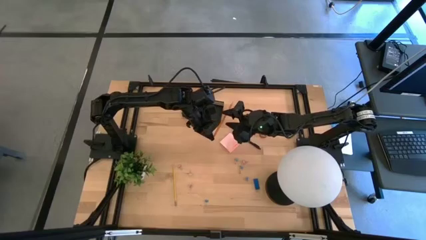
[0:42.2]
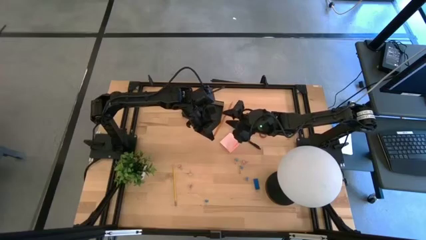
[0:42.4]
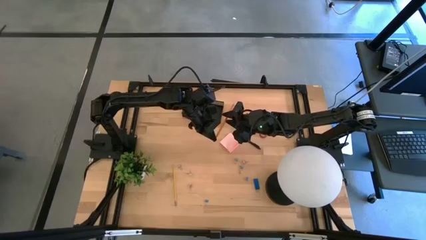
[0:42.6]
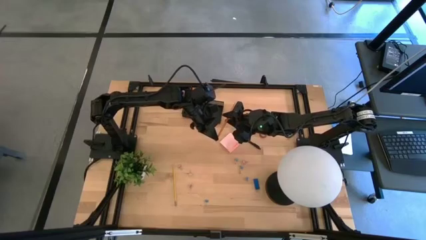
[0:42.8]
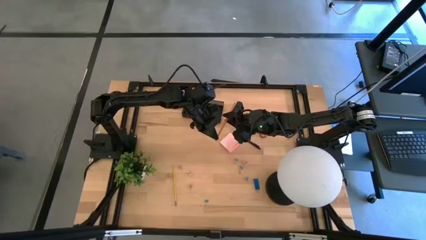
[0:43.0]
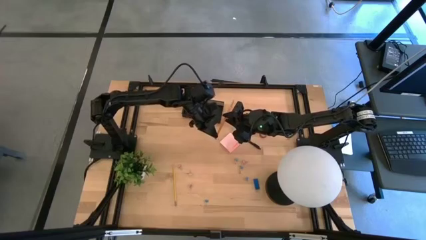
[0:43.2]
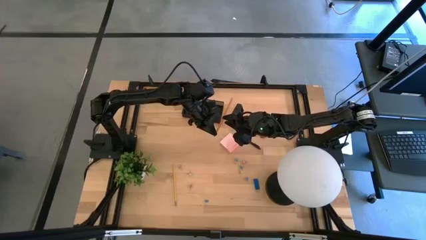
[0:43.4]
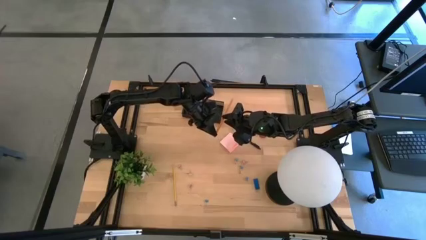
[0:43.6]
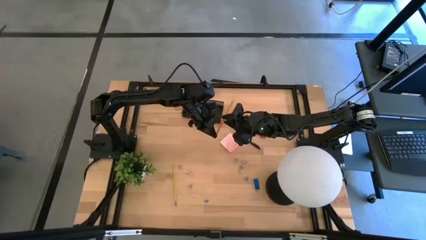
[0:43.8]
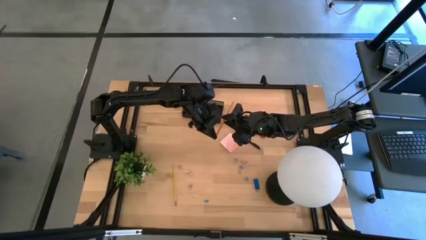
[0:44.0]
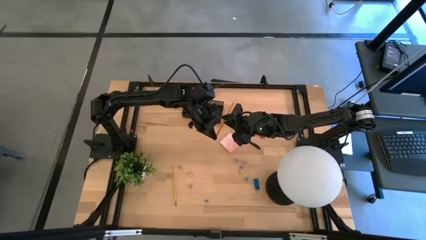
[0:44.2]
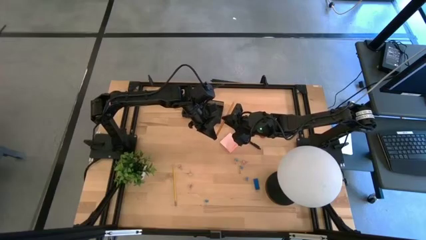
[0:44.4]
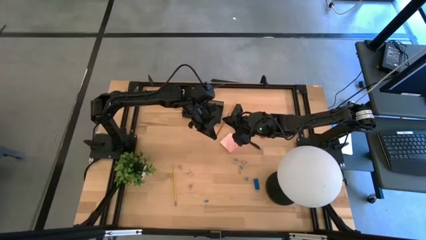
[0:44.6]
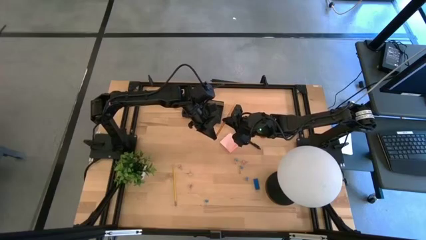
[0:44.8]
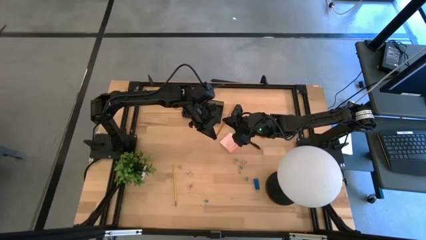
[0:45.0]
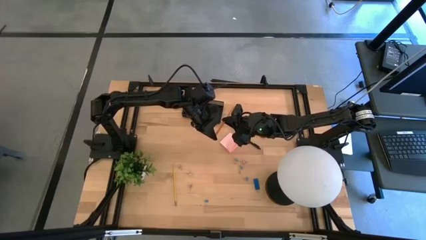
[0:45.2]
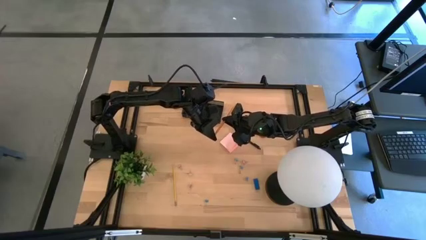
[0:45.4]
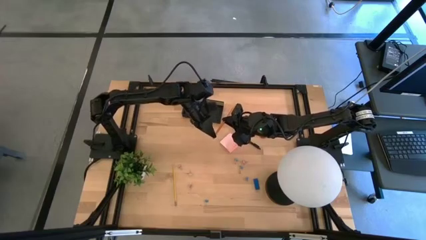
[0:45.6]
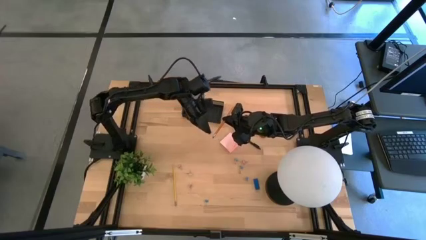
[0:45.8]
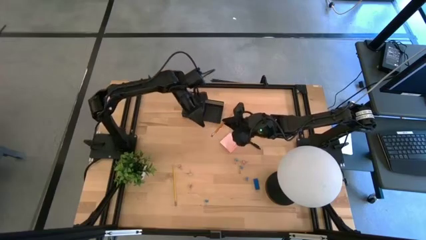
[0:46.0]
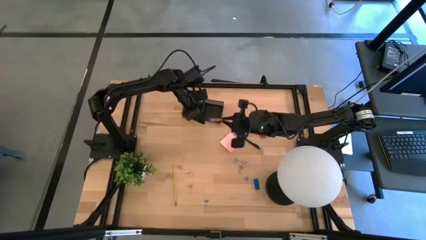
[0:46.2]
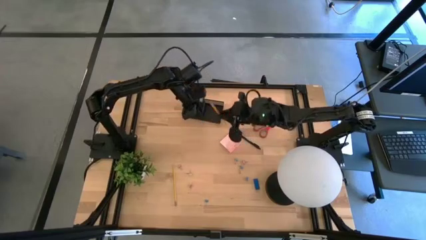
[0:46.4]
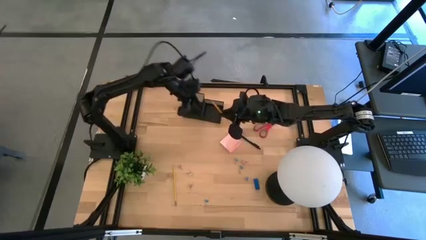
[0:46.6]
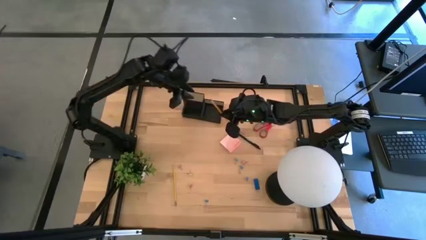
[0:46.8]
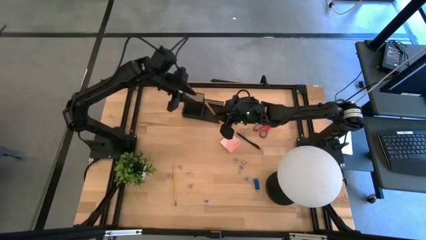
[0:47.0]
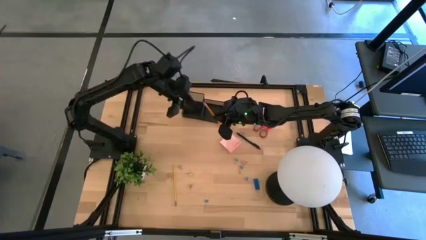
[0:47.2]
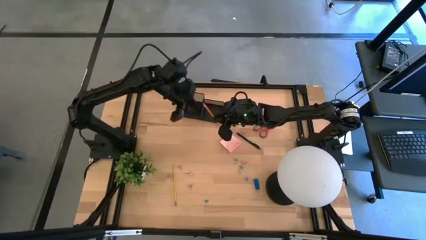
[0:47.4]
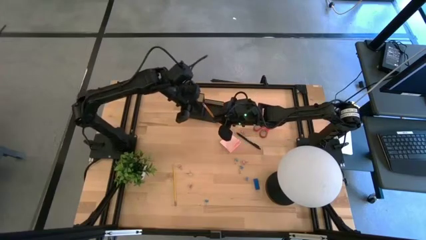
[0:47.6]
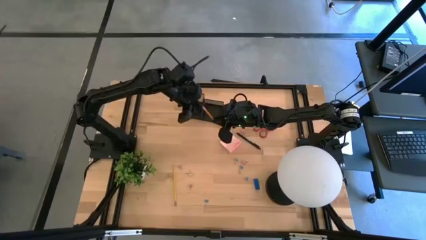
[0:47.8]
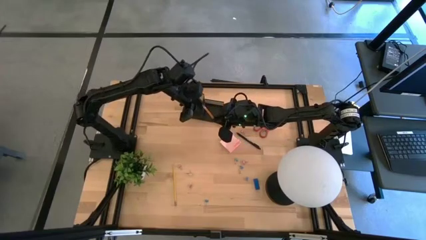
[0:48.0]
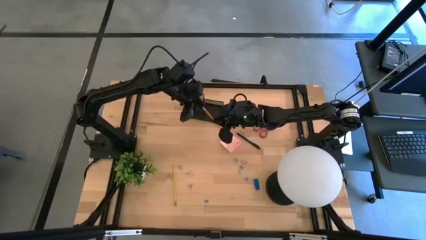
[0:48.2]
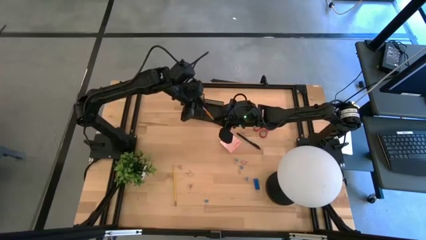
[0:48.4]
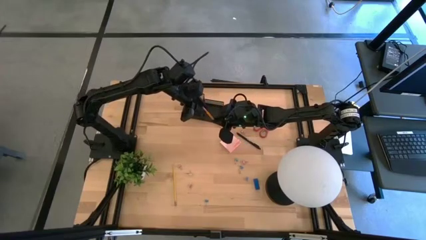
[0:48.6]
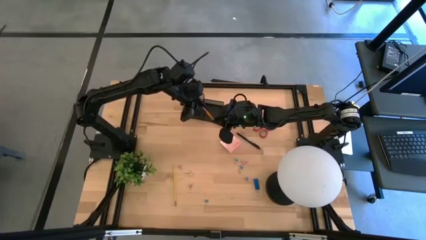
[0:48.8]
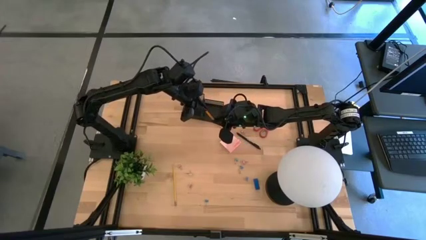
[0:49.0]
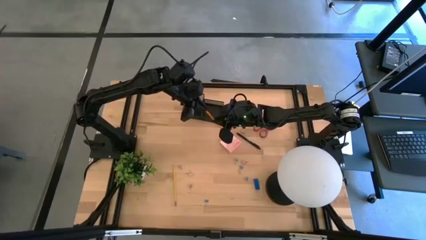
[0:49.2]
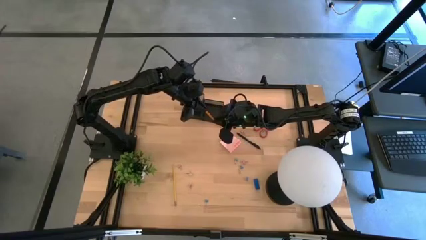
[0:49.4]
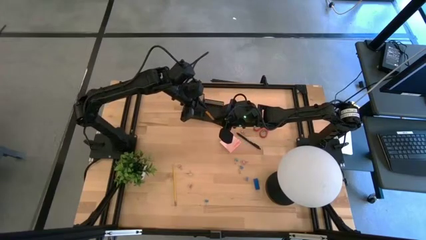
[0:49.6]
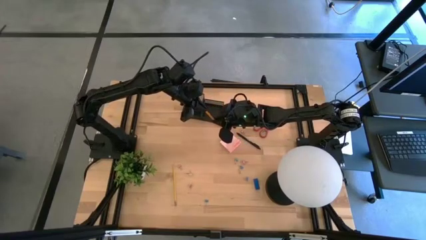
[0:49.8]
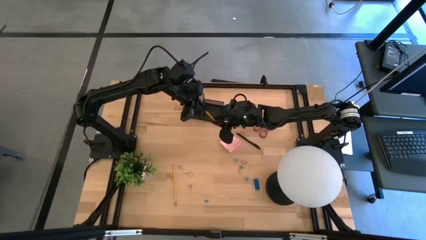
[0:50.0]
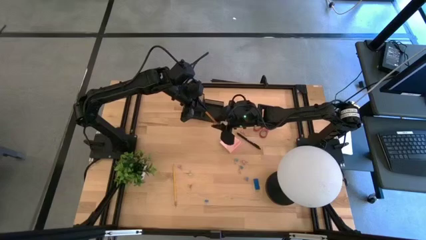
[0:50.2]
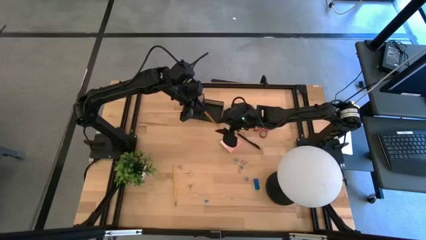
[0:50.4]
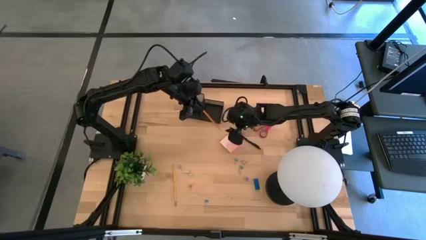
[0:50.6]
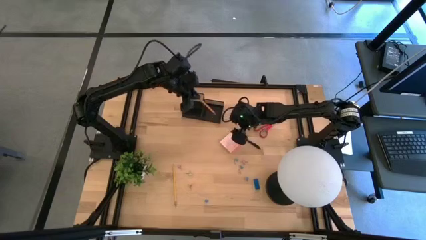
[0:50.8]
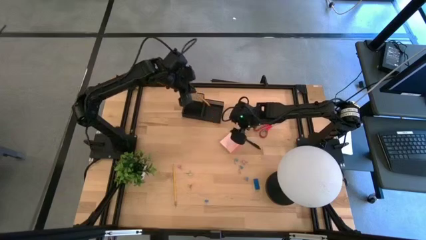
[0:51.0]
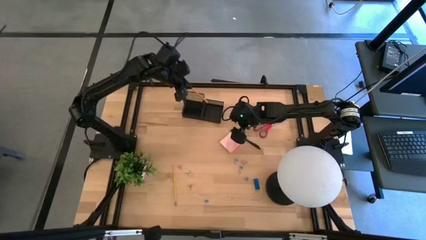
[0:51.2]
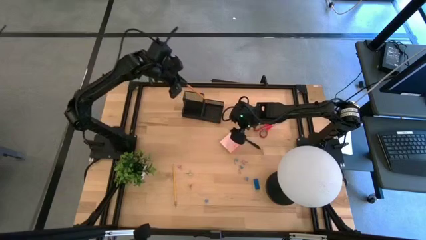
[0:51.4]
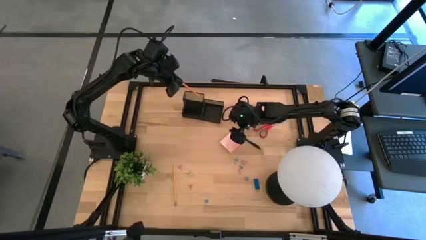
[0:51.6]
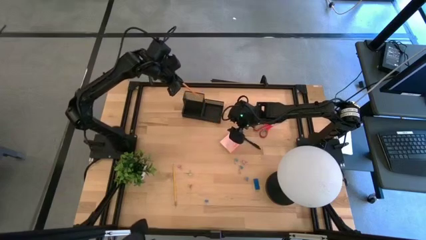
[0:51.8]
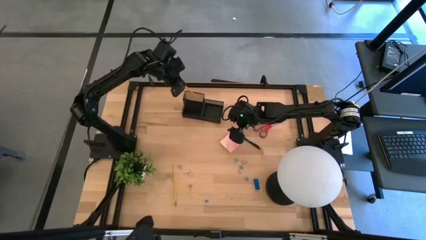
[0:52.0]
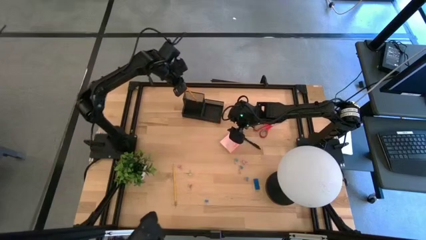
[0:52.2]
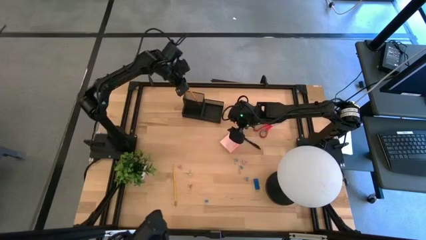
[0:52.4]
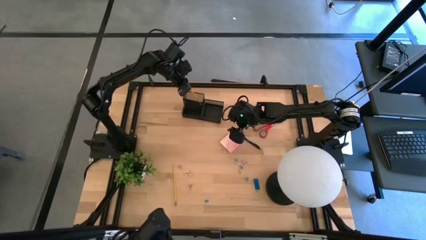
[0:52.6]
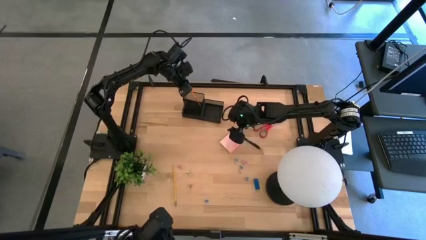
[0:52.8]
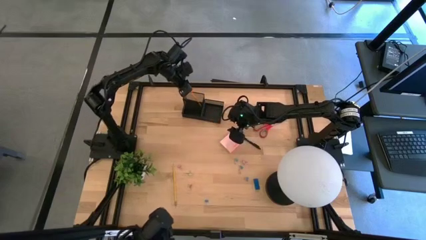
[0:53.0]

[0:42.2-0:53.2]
Task: Pick and place office supplies into organizer
Put the orange pencil into the black desk organizer

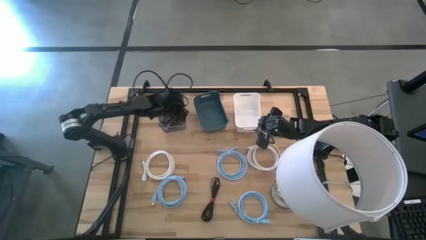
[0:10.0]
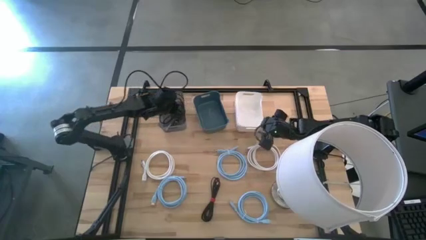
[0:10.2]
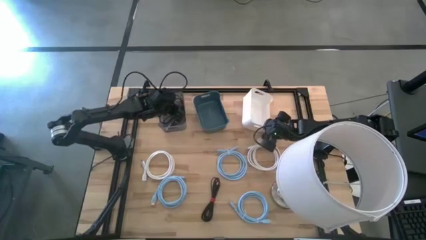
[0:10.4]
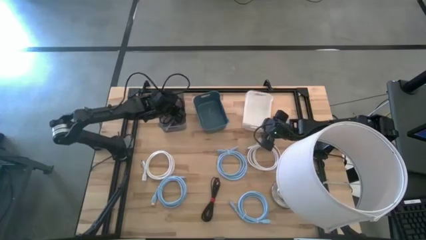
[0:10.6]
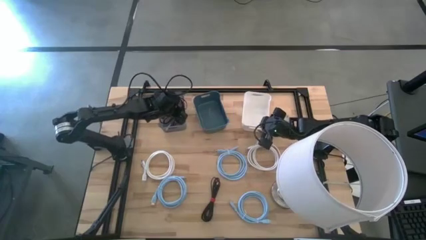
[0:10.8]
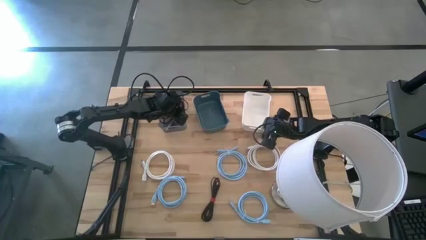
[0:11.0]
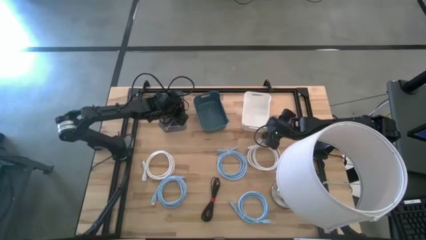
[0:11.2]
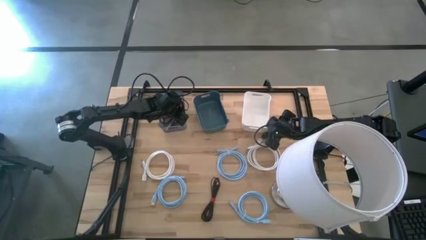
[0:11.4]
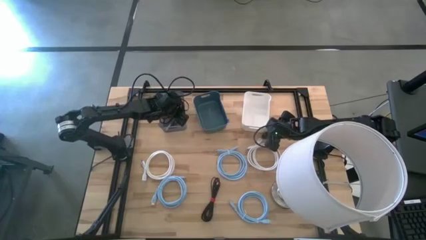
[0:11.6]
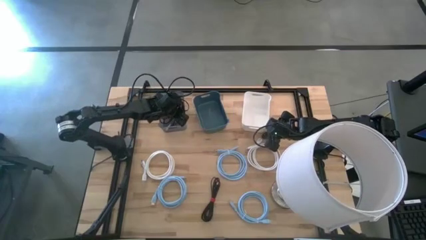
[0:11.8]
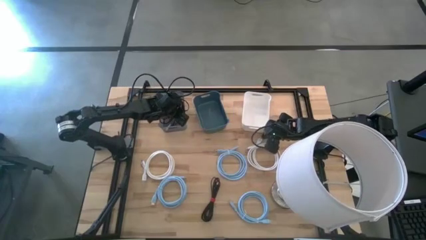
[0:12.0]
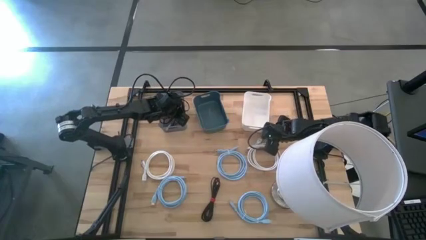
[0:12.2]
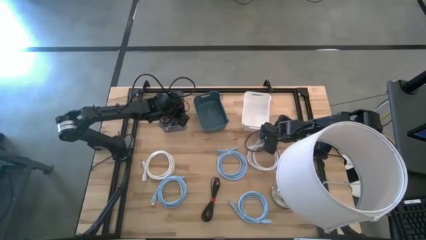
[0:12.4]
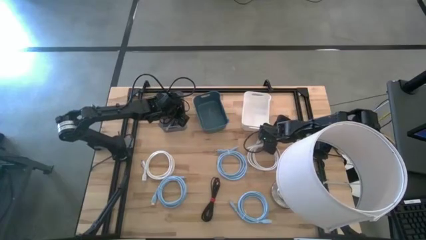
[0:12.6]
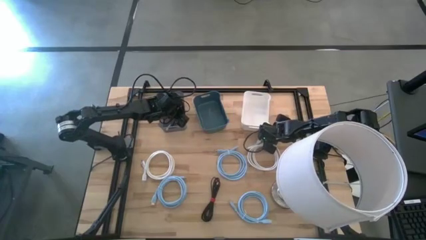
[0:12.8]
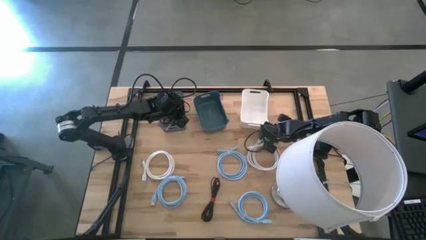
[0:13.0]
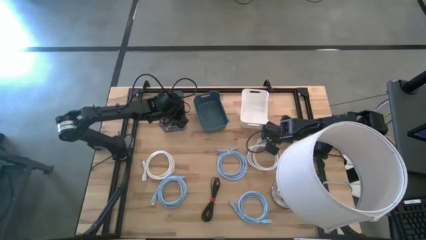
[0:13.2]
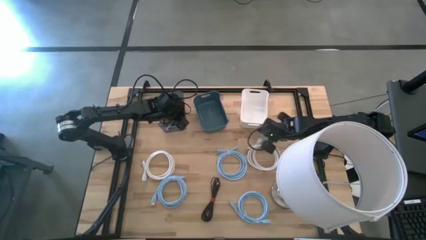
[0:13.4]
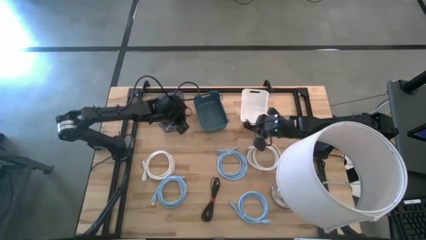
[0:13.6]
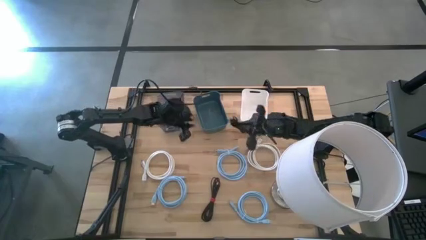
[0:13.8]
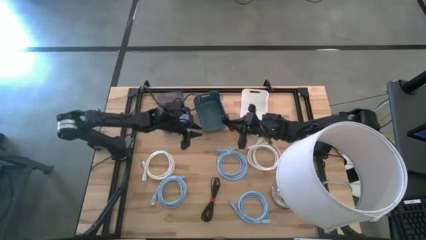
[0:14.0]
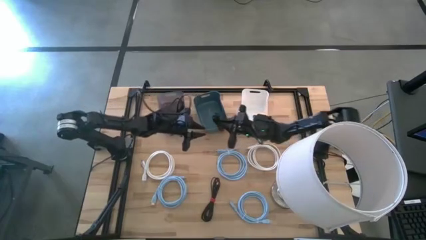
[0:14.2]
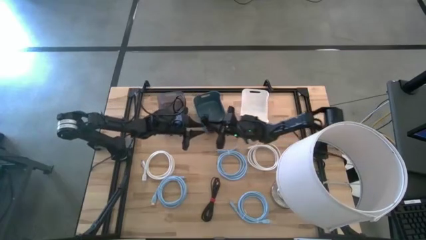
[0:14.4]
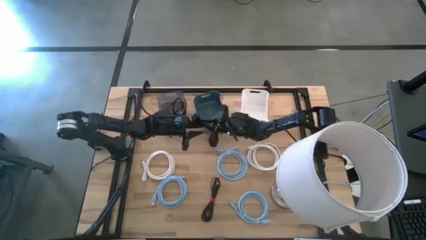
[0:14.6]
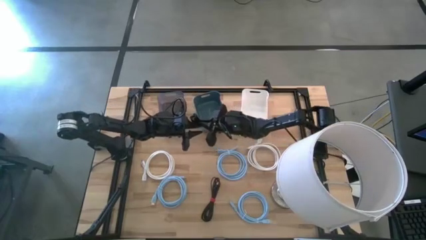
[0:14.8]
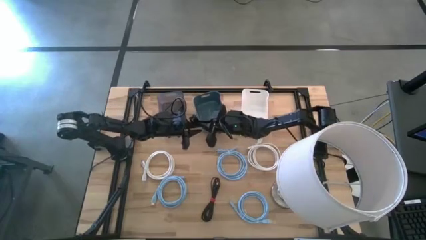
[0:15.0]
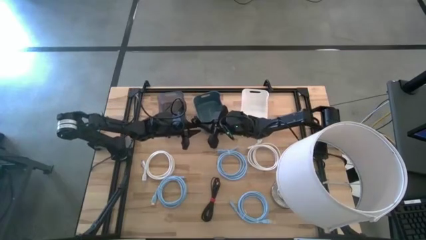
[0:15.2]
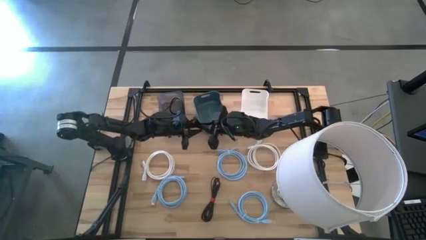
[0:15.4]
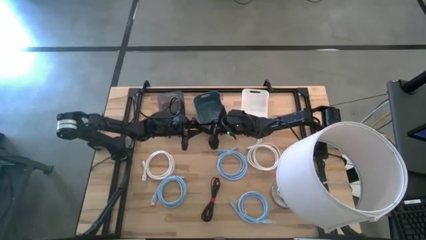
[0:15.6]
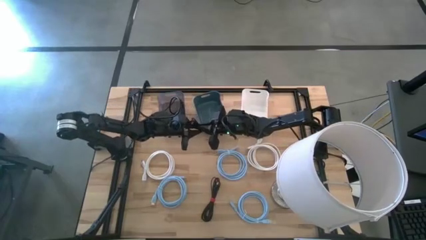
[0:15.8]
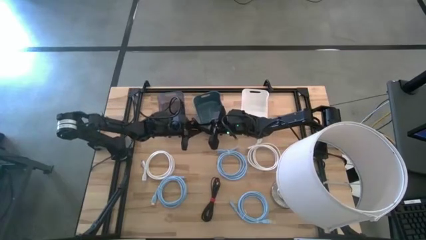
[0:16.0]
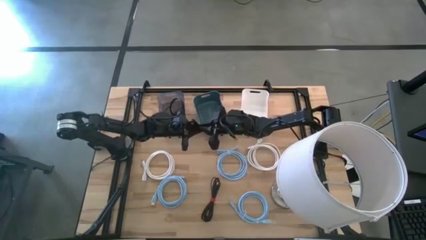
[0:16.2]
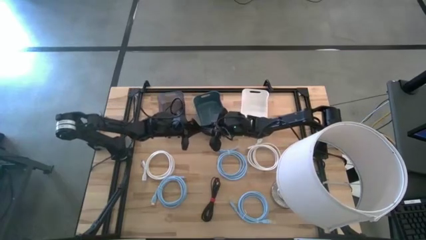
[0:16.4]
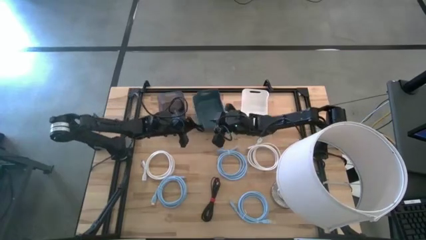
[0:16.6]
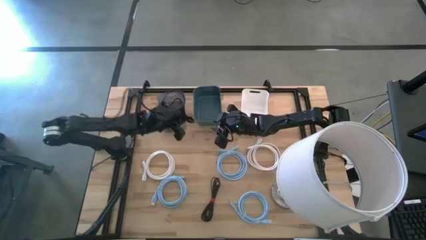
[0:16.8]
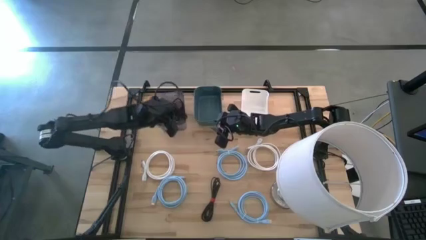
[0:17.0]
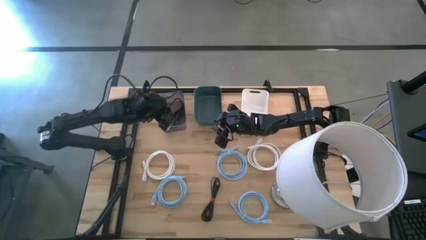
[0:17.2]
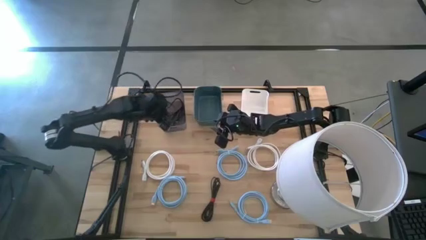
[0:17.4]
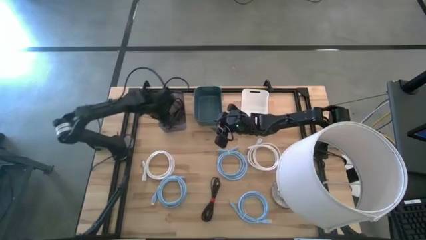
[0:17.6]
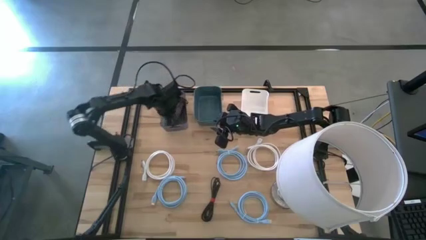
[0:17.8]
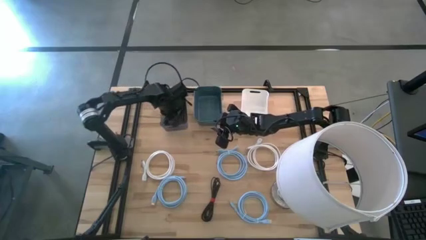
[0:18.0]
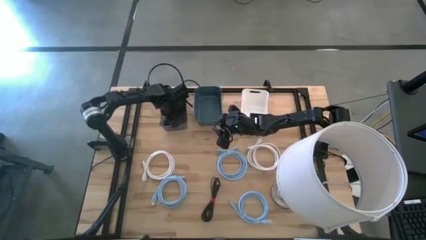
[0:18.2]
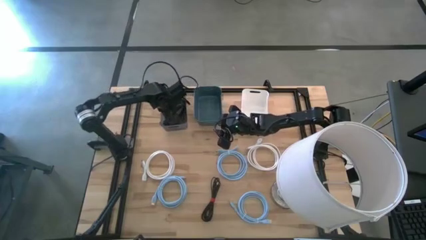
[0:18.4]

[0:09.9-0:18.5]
Task: Sort HDMI cables
Put the top black HDMI cable into the black bin
